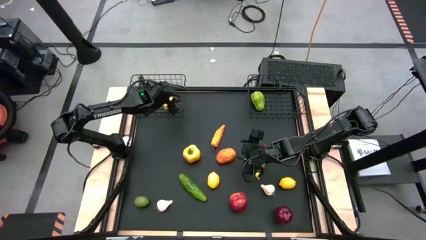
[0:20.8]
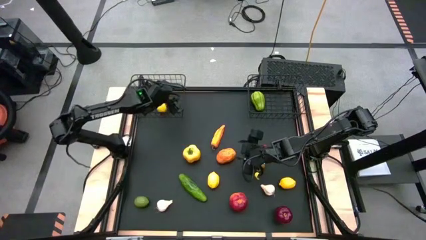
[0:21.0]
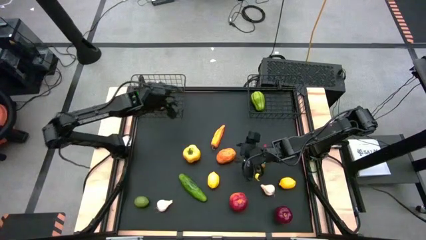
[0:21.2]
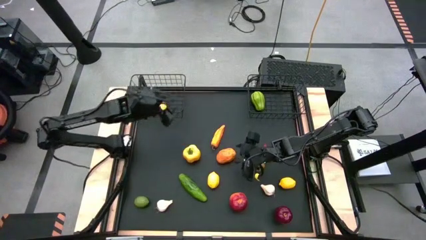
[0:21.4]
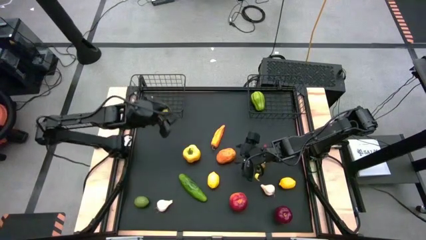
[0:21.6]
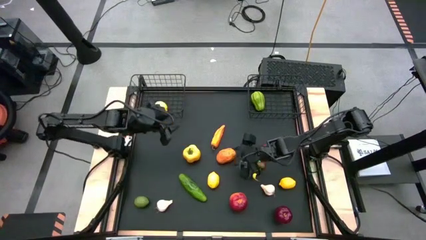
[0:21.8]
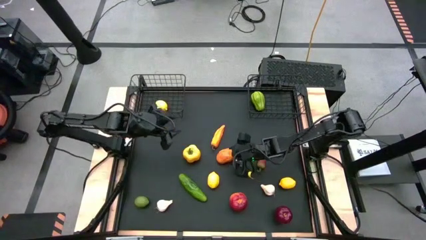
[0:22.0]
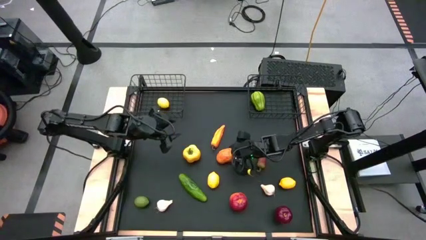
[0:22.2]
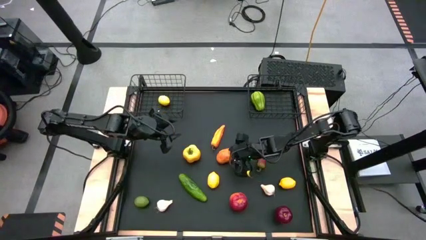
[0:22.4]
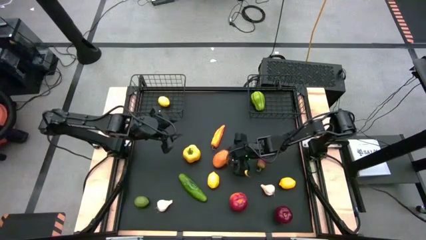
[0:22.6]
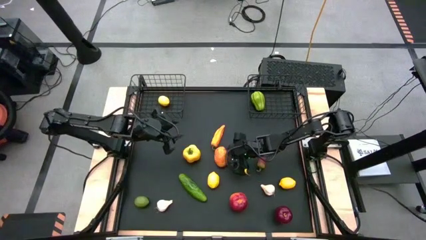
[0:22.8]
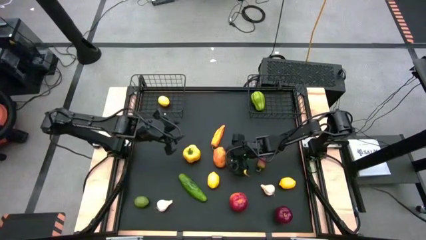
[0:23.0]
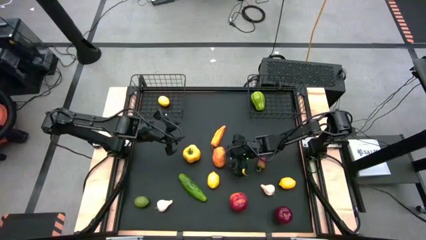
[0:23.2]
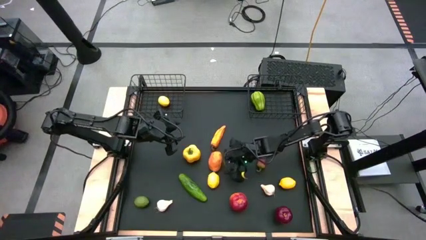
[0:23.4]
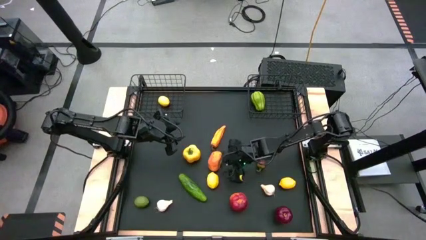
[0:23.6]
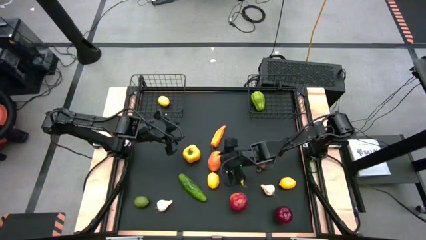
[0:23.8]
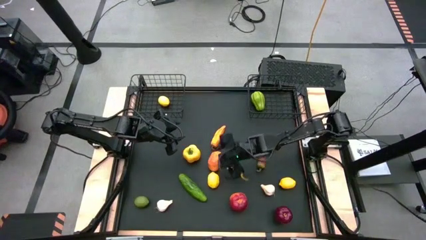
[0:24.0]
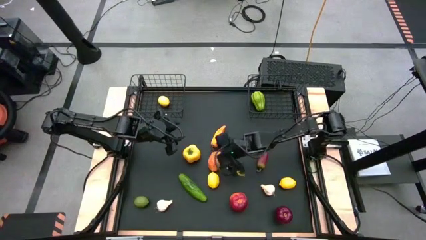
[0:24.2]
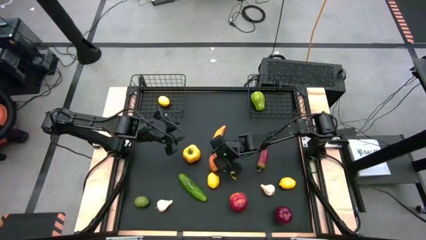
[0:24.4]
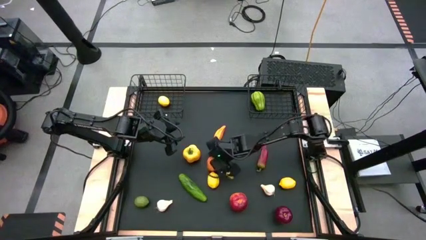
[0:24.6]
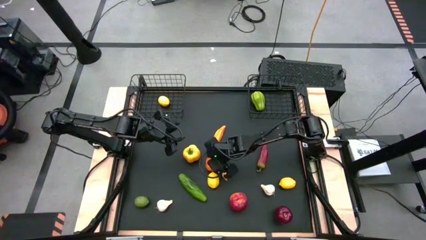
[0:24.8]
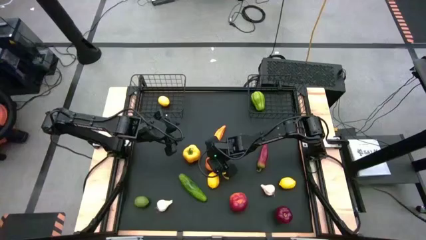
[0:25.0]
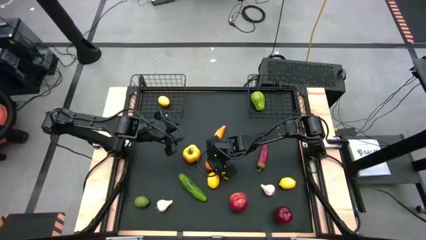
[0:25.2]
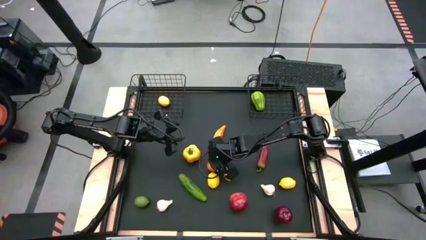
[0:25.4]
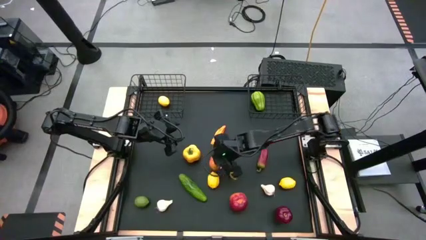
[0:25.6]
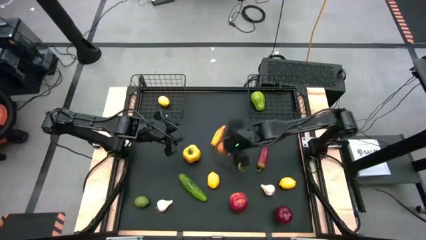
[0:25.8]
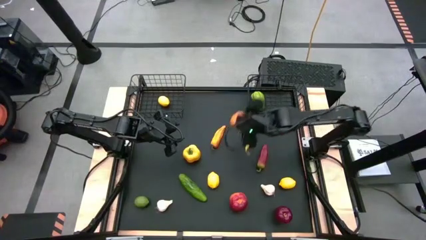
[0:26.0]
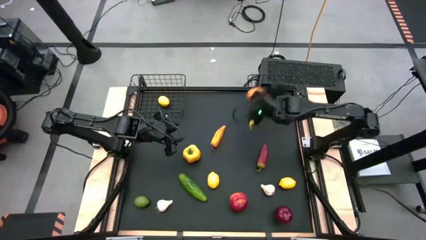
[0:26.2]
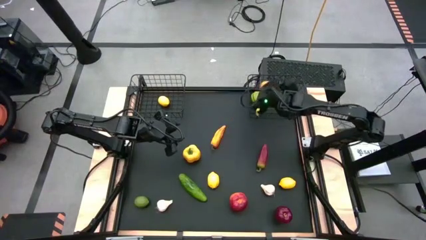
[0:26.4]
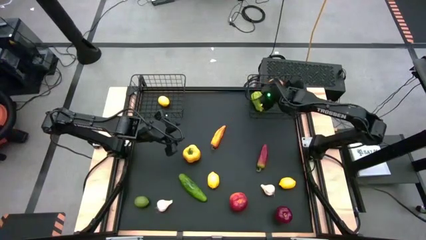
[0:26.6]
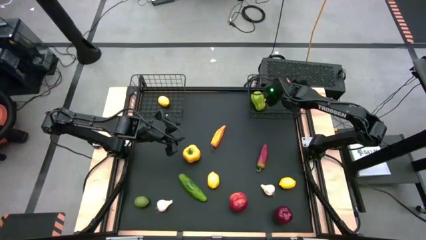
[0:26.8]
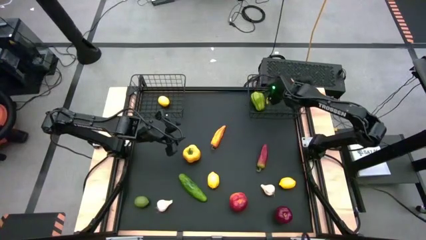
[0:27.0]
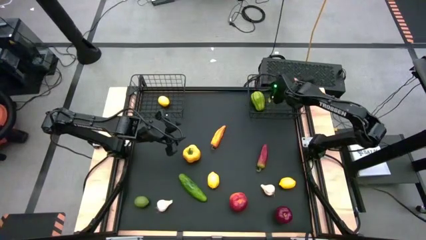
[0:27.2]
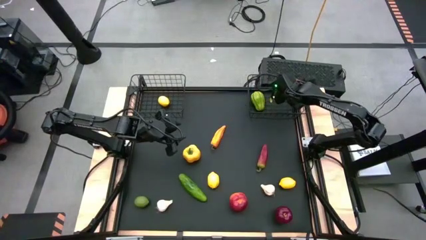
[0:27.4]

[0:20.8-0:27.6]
Task: Sort produce into baskets
Put the brown potato into the right black wire basket

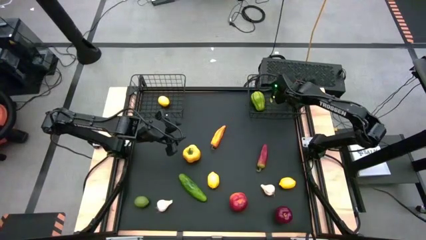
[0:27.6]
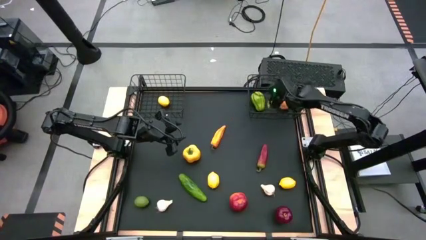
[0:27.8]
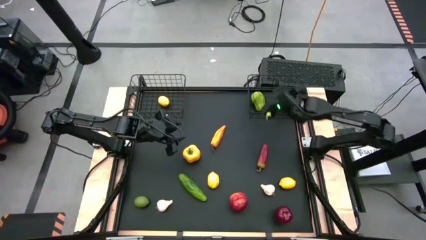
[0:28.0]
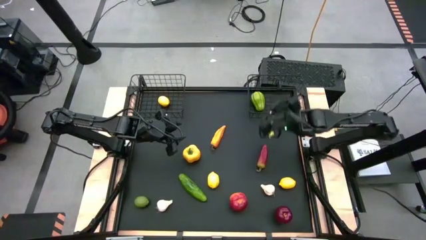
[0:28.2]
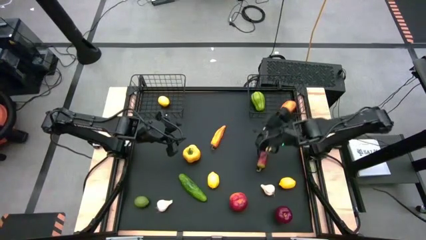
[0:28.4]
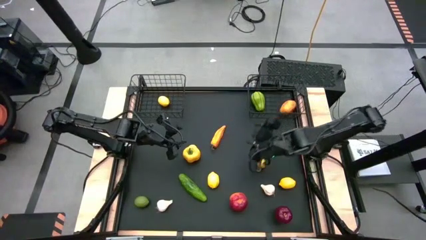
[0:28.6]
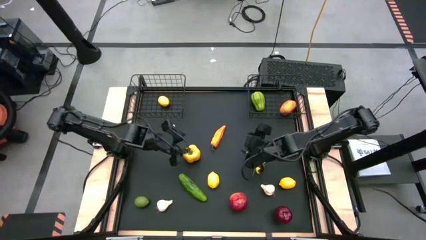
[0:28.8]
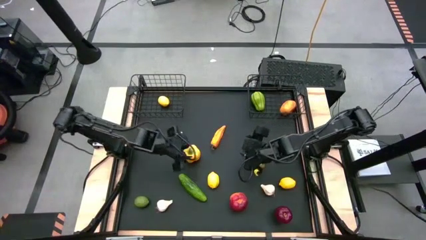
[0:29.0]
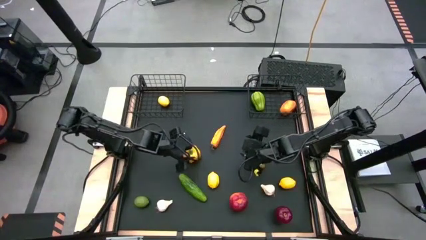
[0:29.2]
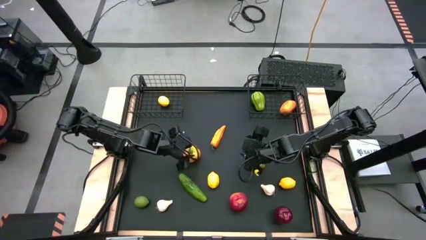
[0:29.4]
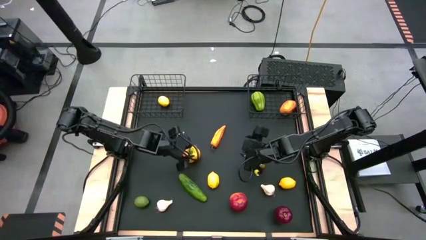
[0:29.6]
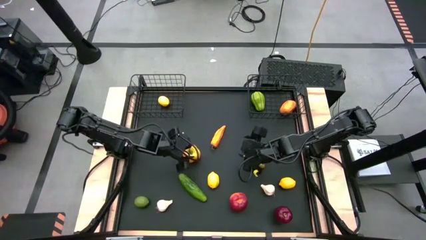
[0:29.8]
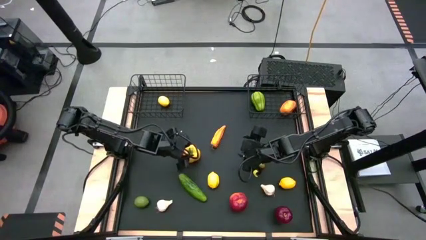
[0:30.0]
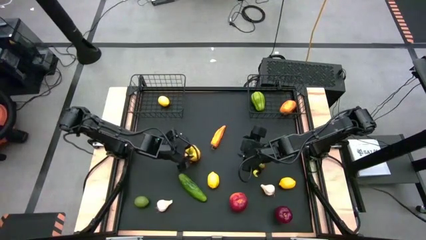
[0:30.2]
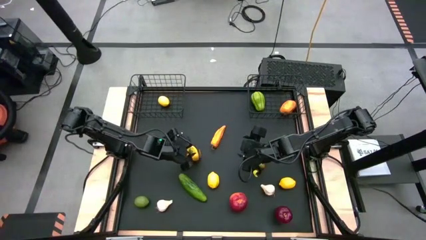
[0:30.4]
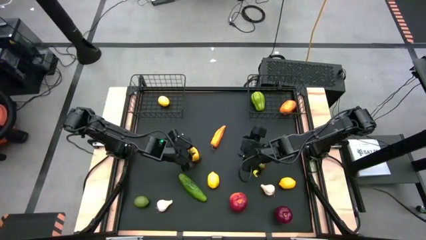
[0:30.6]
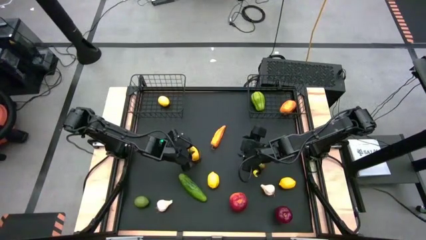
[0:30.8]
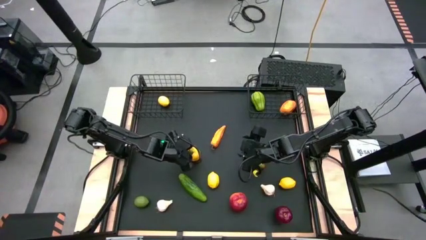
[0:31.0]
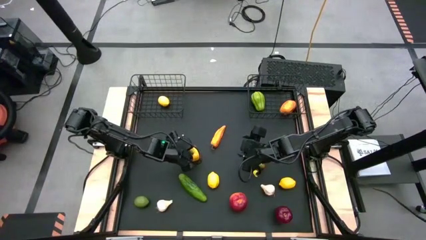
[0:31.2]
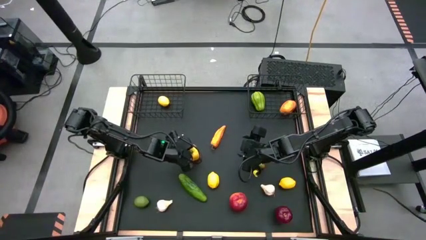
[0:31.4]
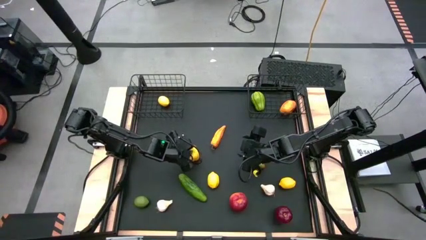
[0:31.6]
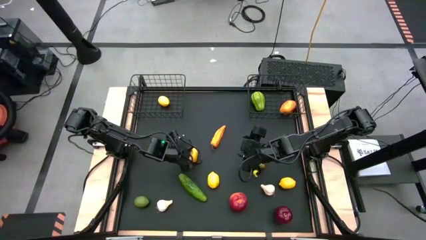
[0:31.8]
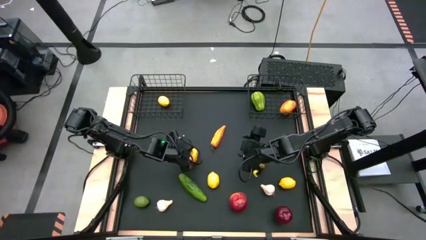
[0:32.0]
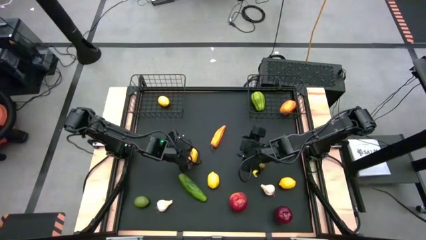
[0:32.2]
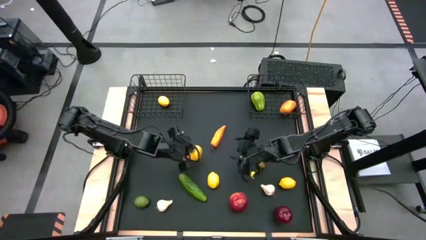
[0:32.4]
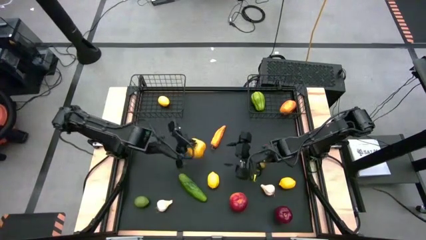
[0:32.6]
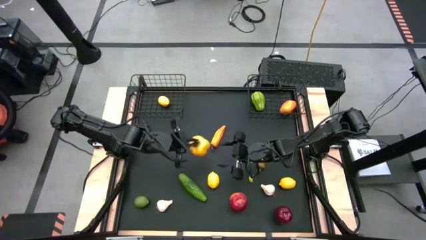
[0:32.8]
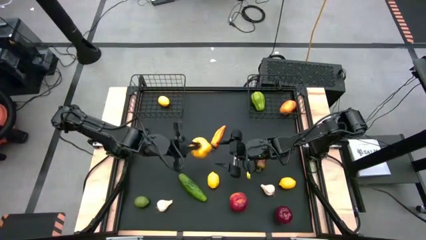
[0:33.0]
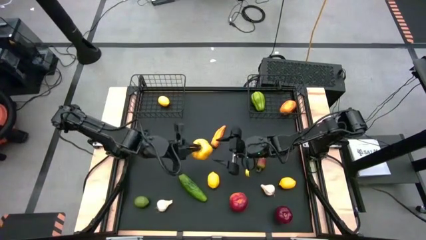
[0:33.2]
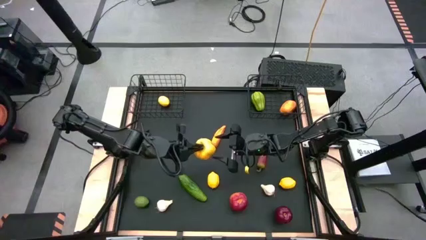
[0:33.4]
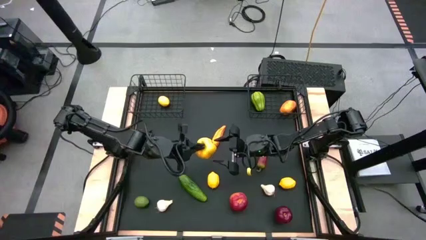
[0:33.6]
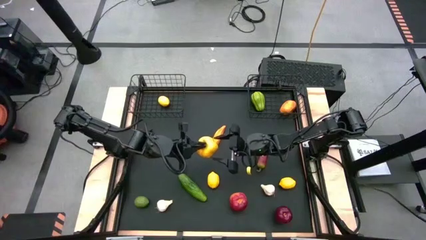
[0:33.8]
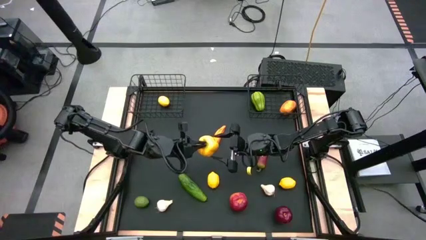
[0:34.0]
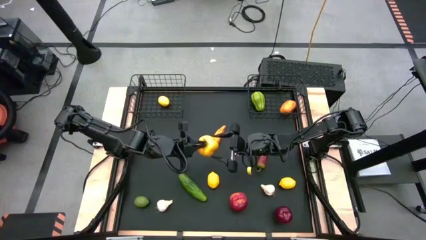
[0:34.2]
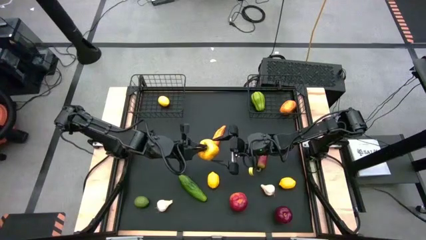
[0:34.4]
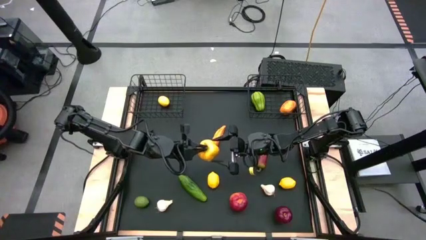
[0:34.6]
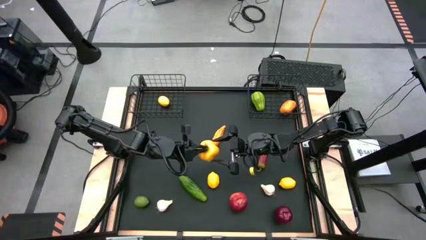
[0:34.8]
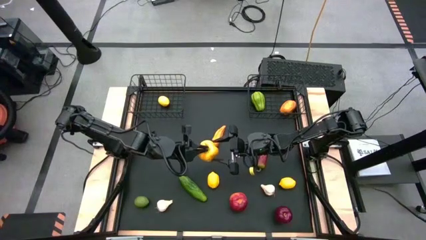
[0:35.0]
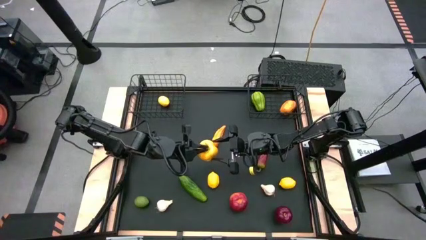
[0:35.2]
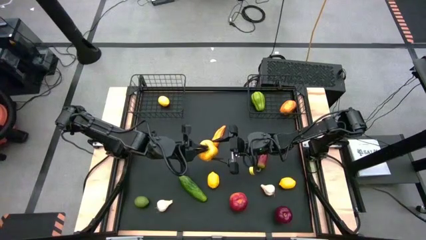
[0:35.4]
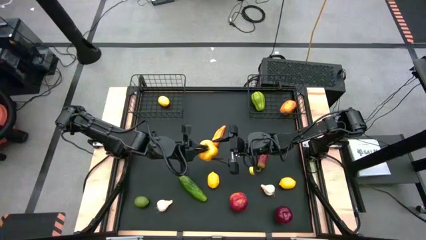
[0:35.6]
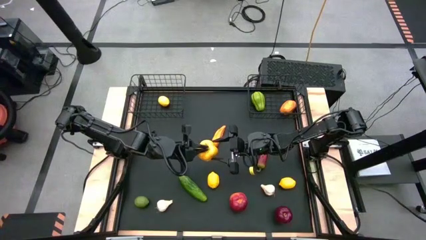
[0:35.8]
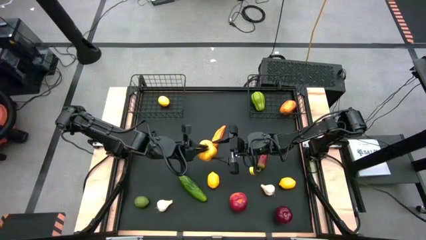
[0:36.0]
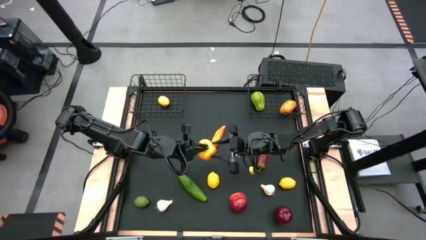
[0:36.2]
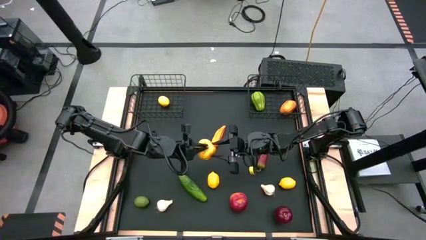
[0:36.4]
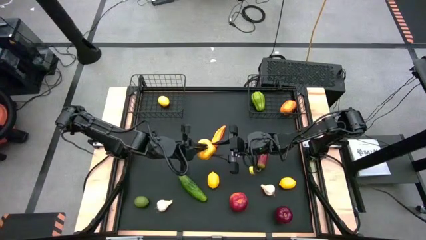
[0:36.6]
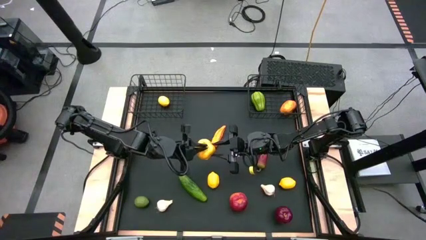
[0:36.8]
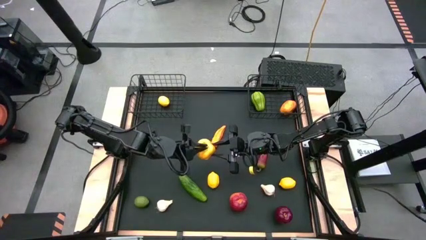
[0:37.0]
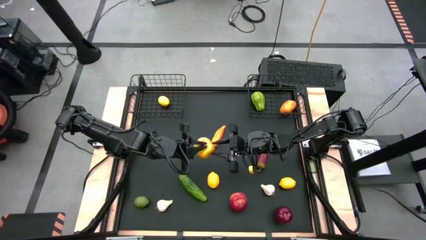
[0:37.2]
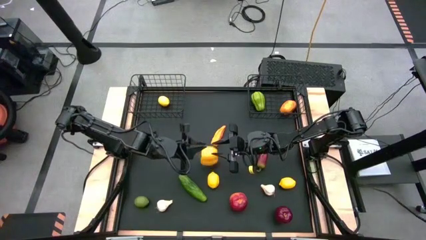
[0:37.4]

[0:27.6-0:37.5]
Put the yellow bell pepper into the right black wire basket
